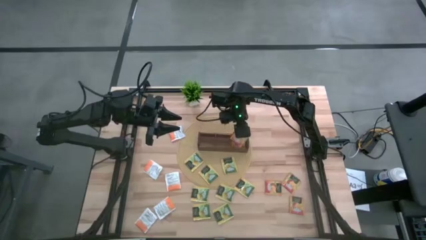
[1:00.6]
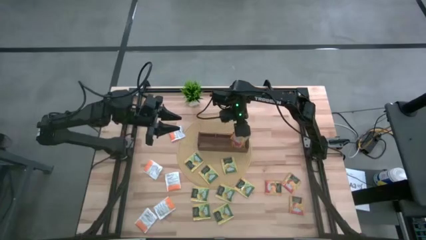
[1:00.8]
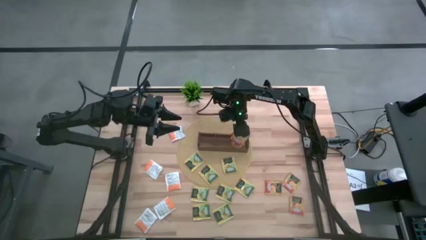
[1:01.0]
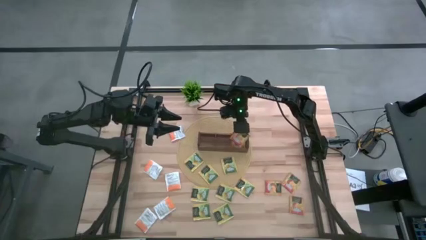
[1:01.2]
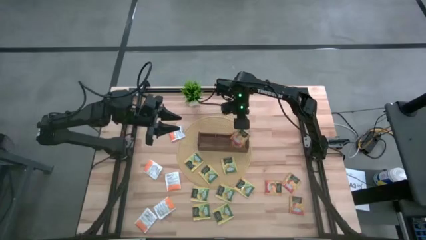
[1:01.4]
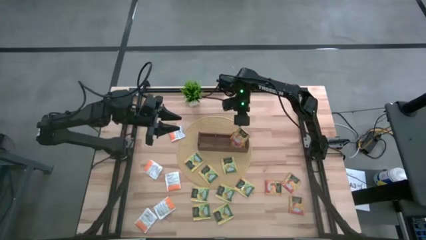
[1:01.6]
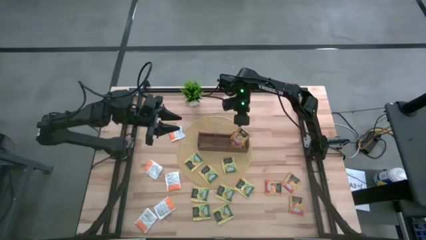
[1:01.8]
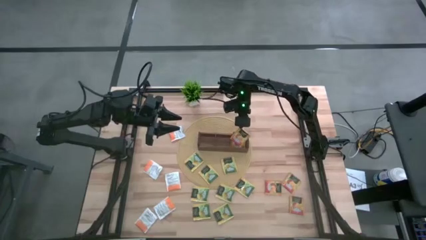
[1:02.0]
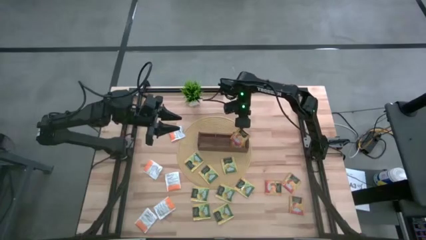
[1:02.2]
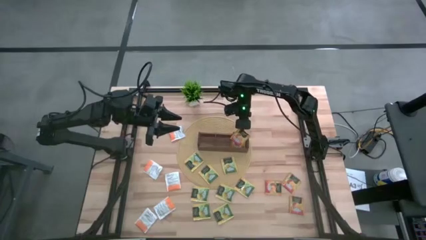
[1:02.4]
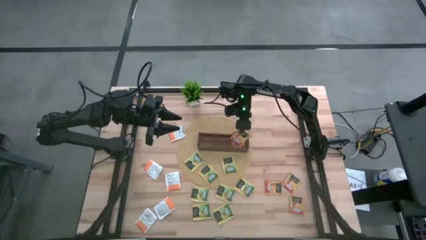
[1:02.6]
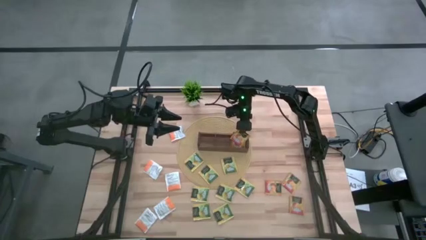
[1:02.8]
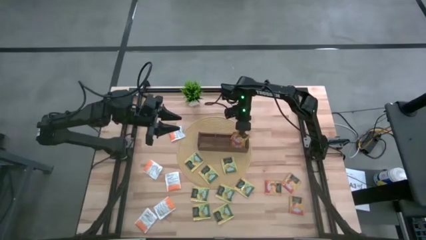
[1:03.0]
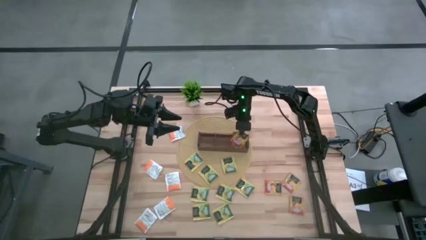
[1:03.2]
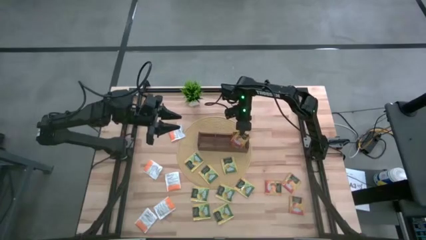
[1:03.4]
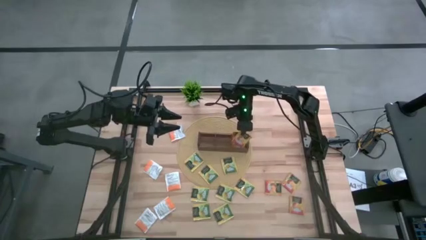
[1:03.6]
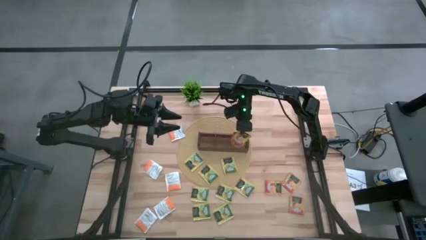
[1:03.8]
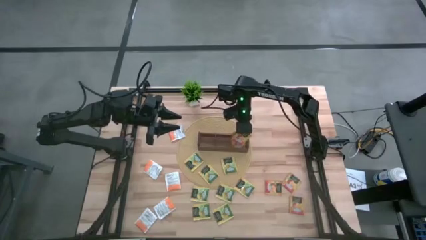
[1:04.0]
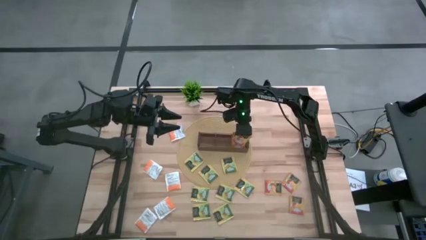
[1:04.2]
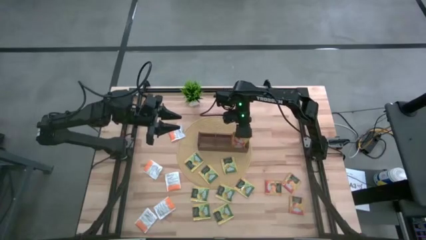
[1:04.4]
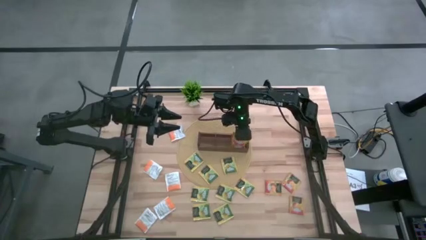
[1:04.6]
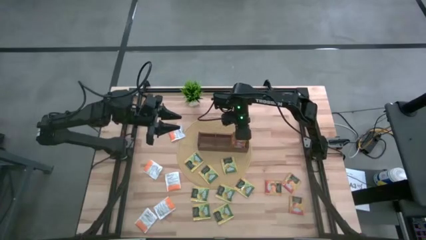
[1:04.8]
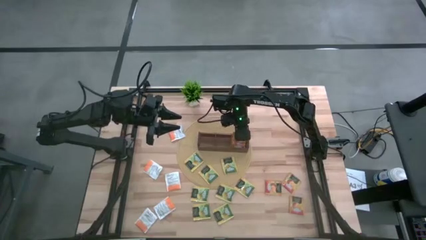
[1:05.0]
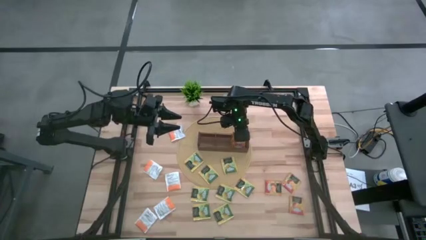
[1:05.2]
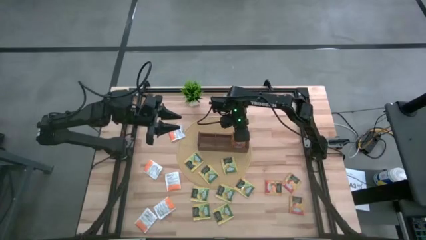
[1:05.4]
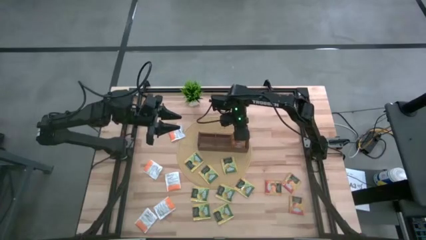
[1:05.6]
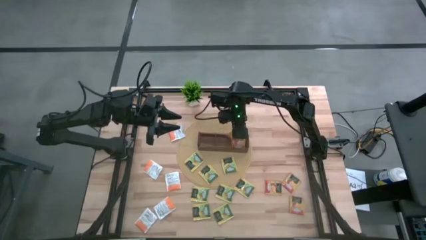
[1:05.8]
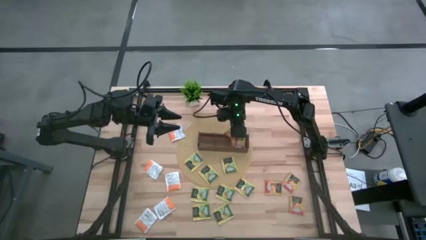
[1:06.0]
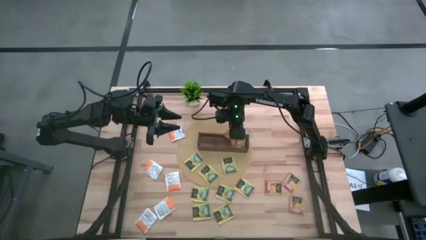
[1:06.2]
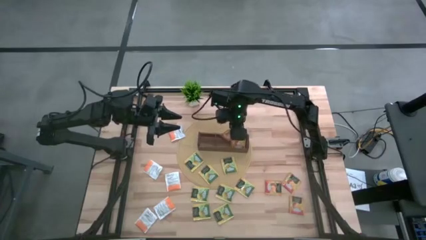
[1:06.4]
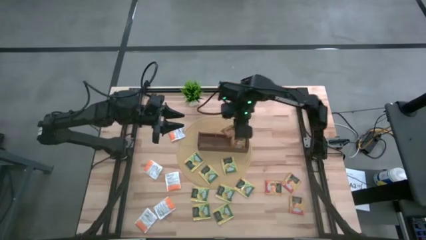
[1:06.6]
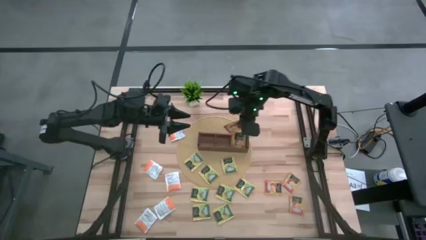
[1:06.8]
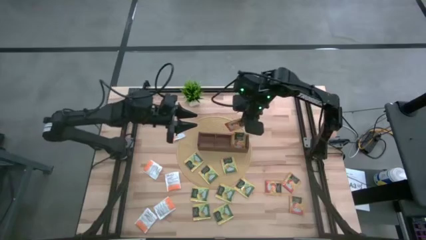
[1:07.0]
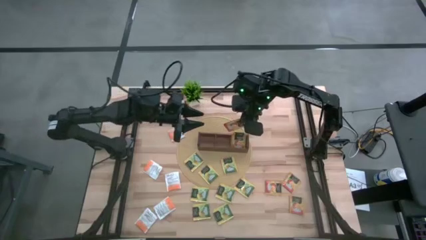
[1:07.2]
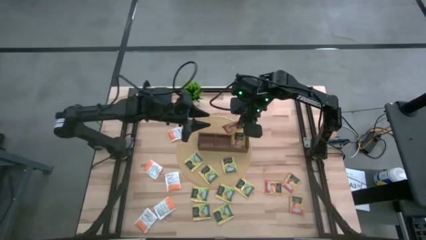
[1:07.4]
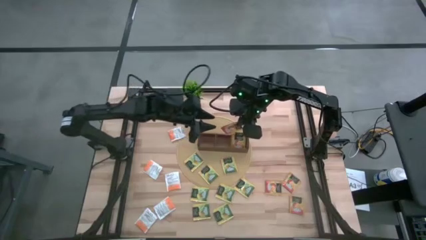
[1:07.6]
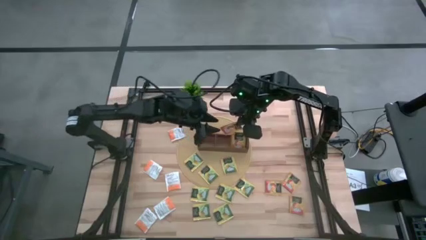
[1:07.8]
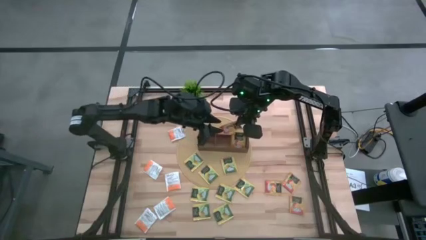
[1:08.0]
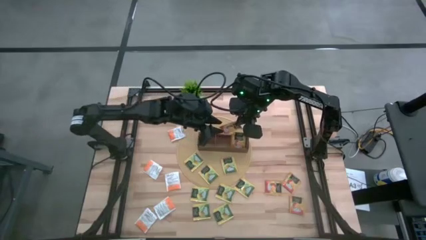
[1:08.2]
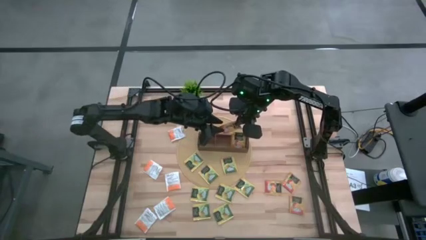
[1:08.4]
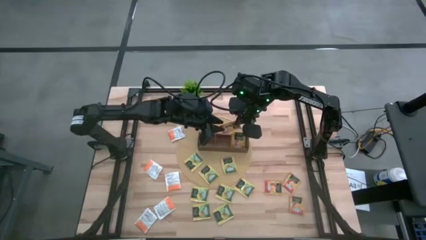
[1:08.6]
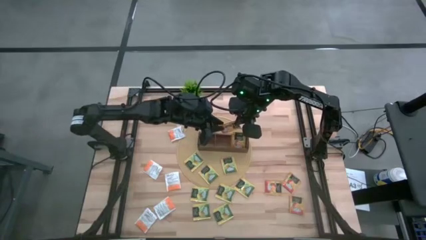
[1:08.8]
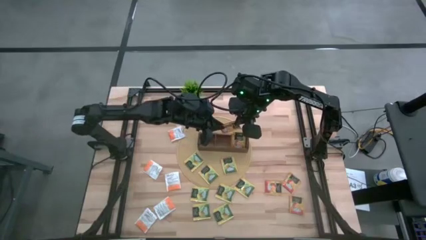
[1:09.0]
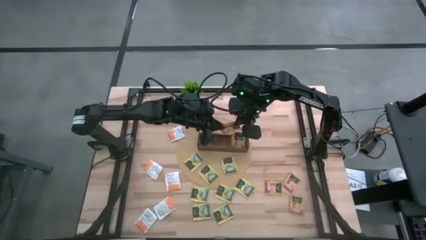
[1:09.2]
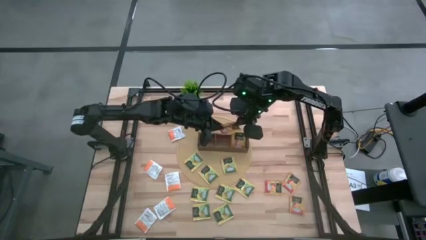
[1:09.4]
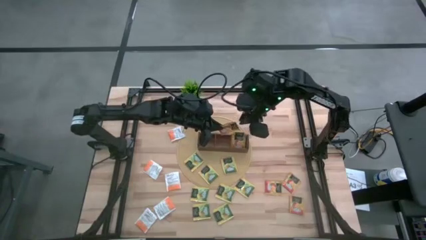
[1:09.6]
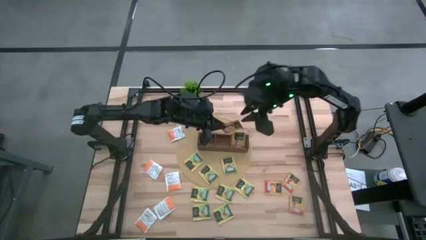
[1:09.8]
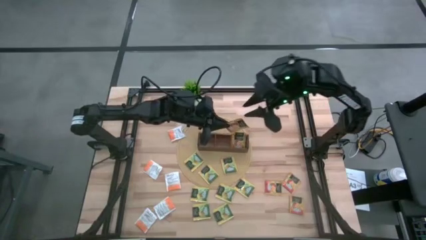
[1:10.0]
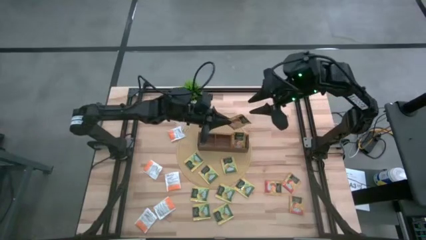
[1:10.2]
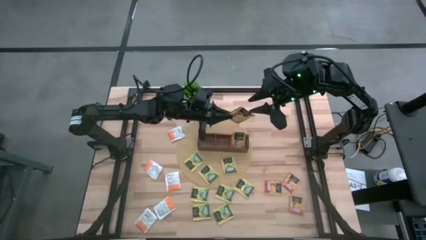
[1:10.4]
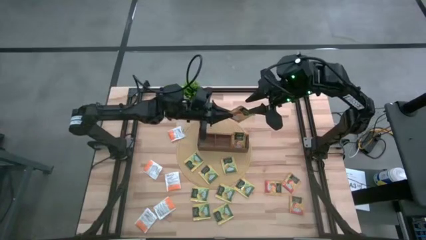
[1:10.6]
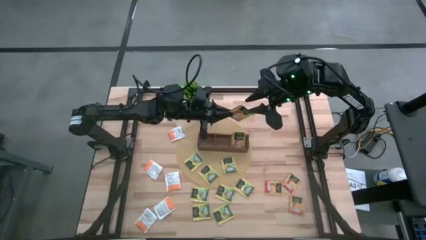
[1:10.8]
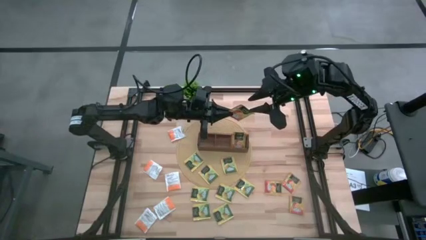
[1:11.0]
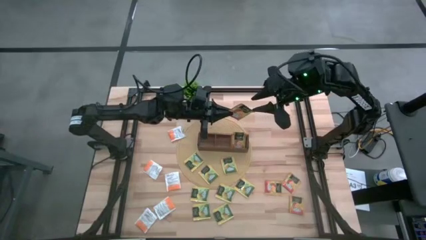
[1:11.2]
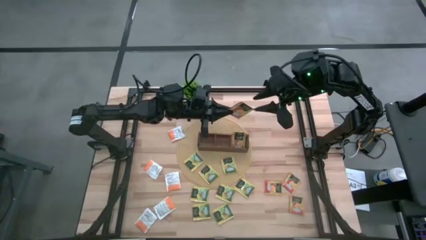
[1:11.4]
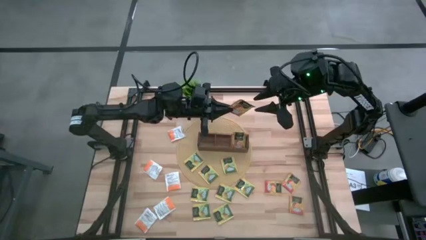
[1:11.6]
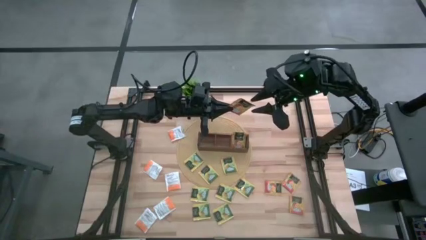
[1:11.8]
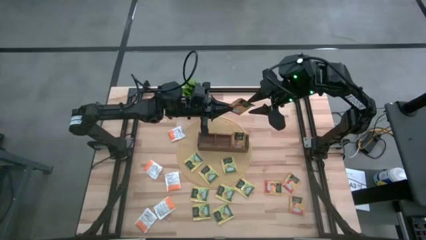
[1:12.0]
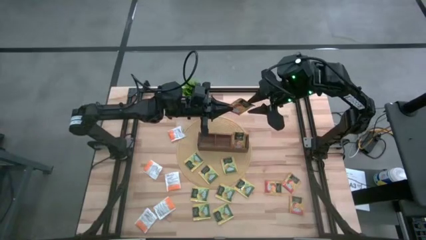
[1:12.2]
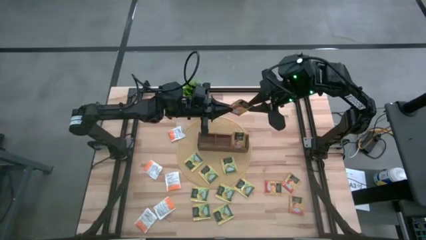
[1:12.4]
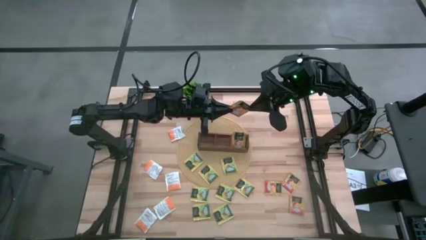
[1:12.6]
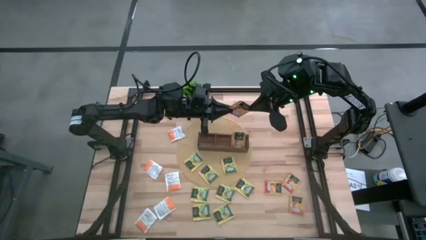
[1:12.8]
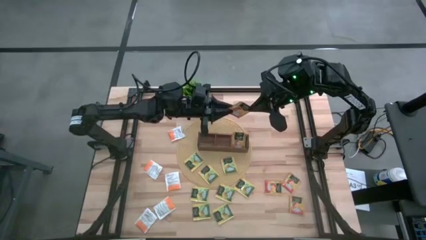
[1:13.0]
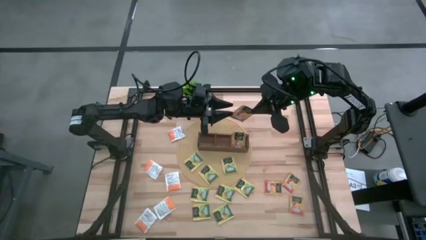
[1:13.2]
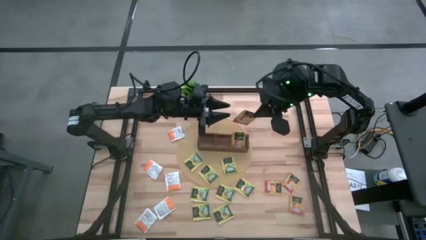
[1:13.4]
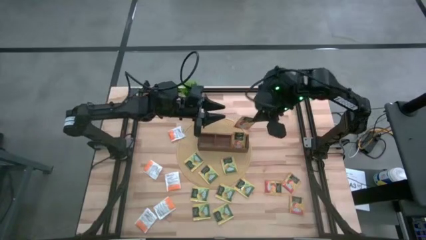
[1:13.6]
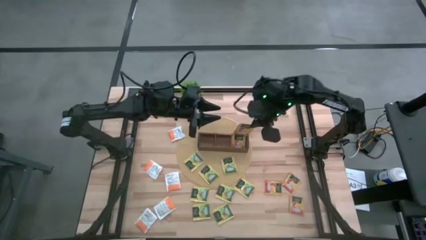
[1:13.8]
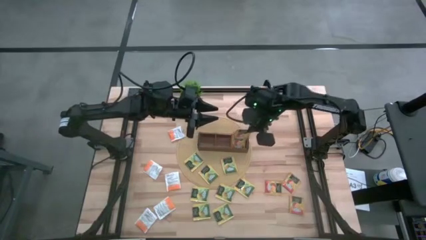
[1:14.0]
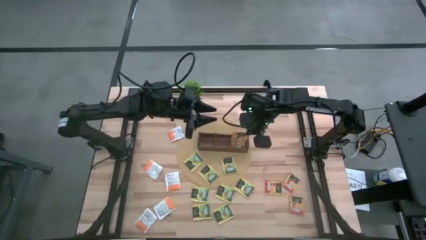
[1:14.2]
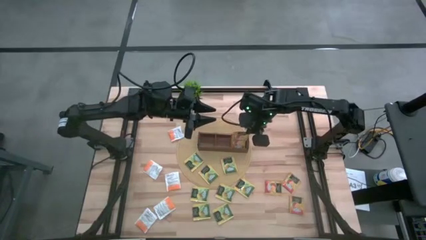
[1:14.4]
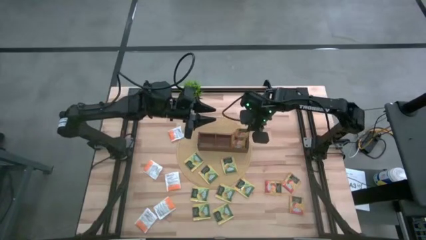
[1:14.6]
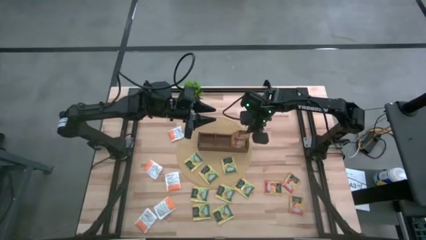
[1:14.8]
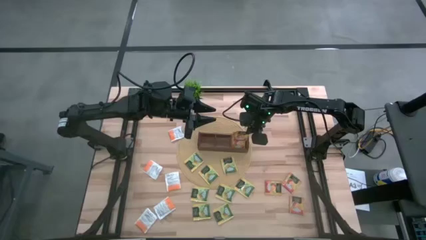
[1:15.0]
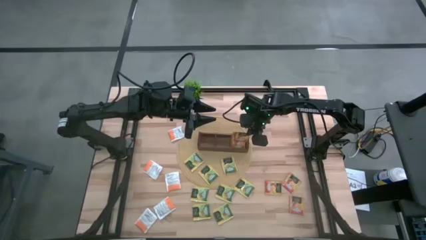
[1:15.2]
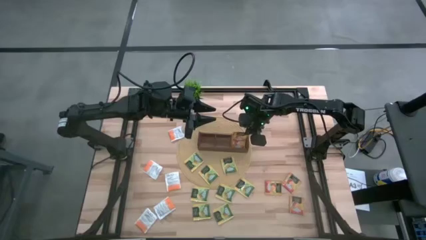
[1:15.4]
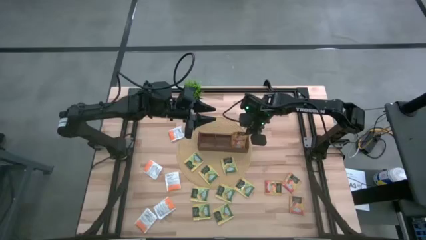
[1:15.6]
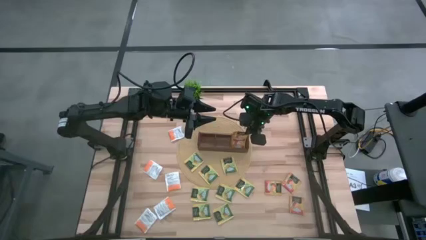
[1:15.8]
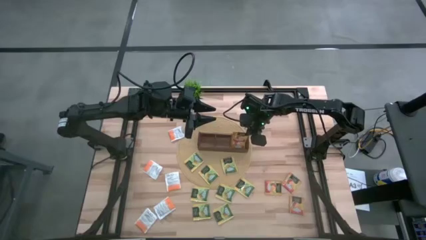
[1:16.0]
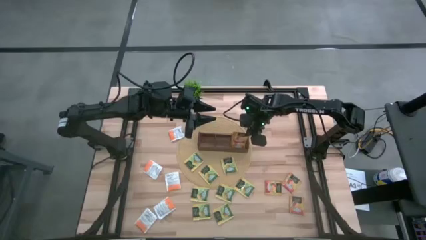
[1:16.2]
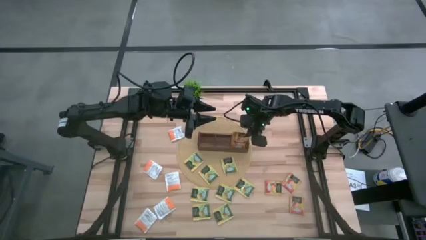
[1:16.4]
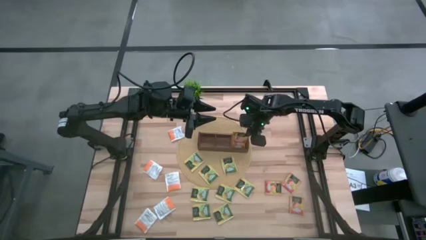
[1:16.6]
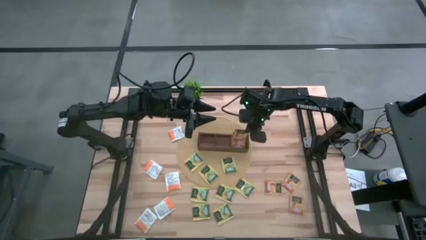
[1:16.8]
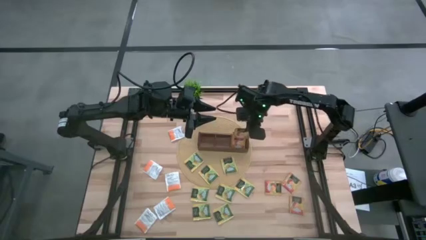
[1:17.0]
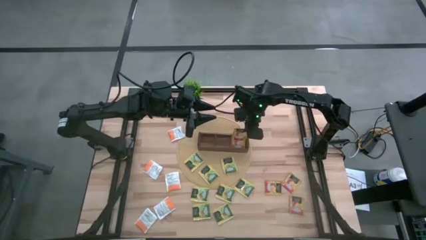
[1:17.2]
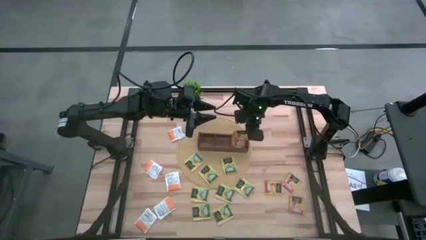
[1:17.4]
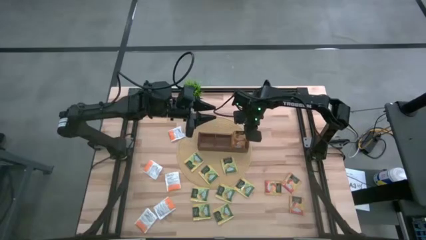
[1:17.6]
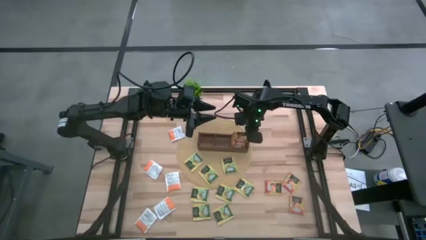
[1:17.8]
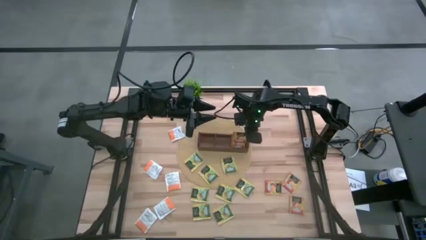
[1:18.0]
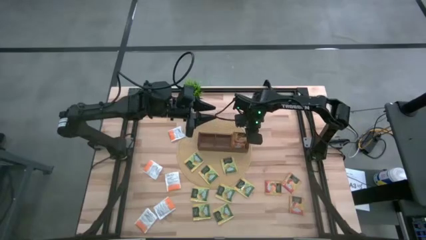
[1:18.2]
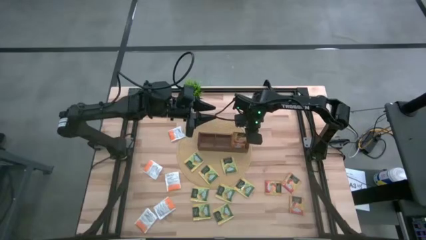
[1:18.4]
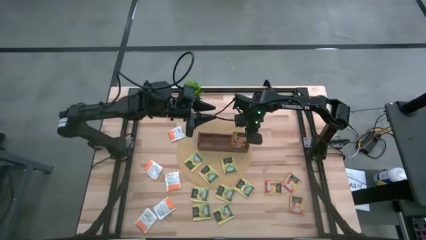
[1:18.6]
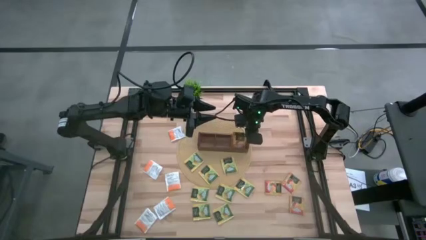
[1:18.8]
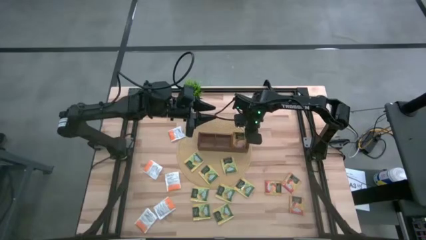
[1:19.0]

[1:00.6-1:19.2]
Task: Pick & Place Tea
Put the orange tea bag into the right section of the wooden organizer
